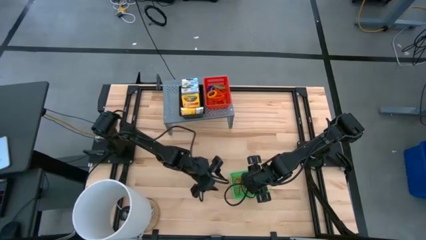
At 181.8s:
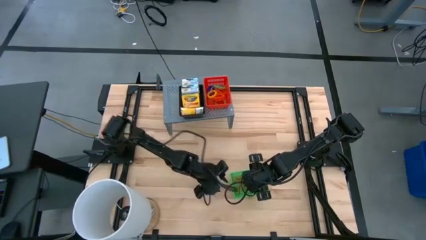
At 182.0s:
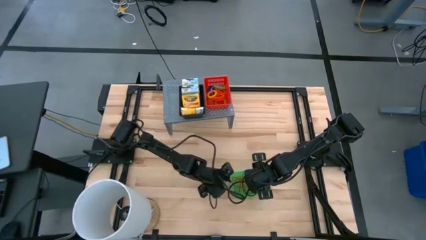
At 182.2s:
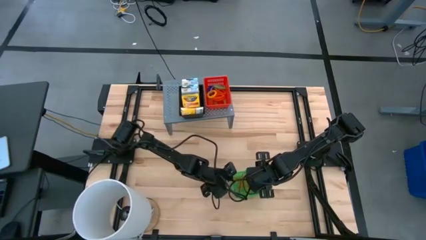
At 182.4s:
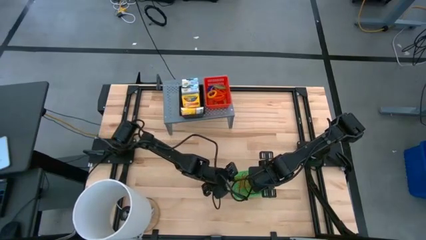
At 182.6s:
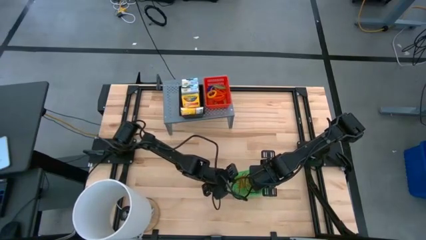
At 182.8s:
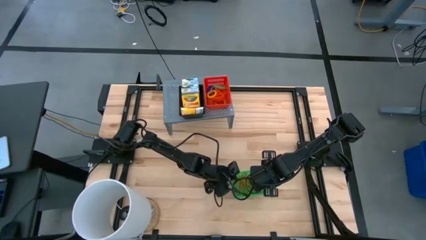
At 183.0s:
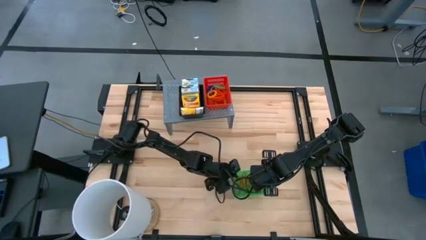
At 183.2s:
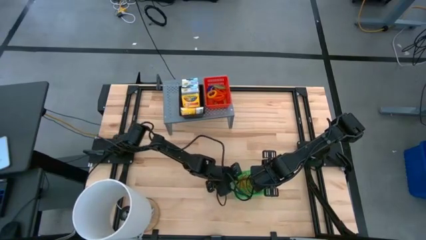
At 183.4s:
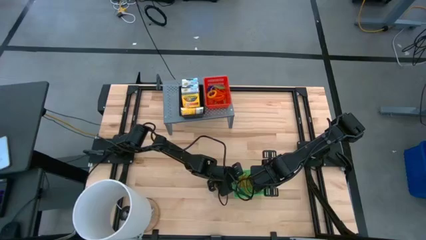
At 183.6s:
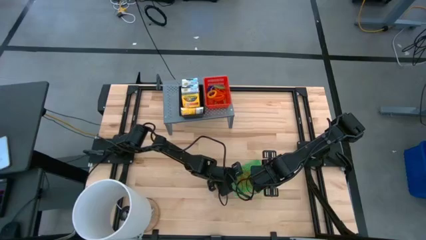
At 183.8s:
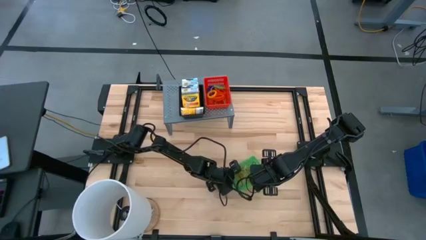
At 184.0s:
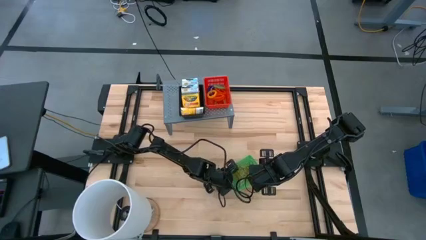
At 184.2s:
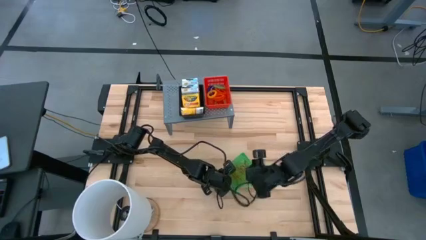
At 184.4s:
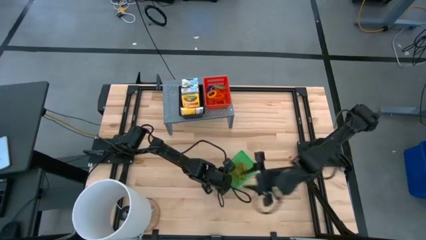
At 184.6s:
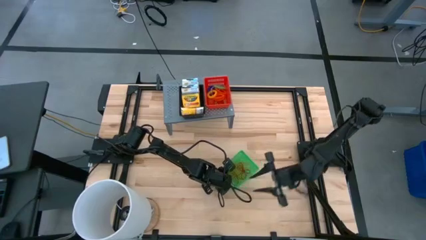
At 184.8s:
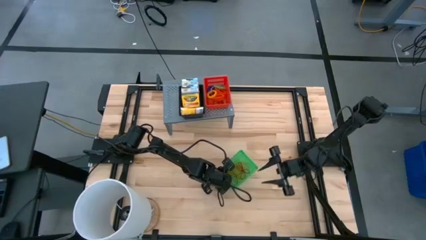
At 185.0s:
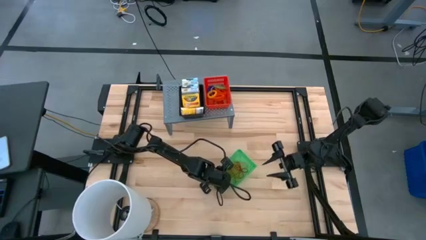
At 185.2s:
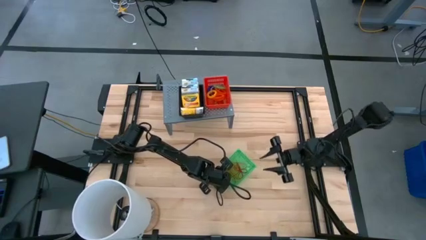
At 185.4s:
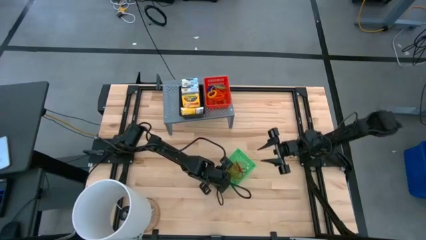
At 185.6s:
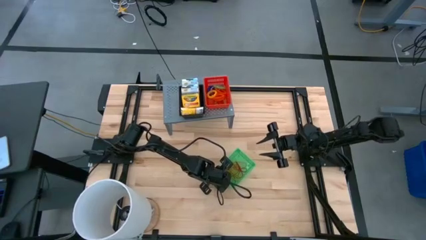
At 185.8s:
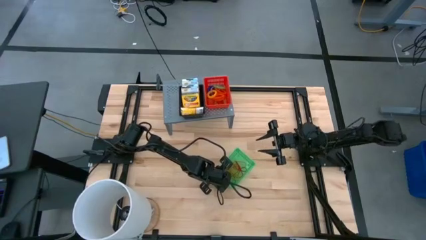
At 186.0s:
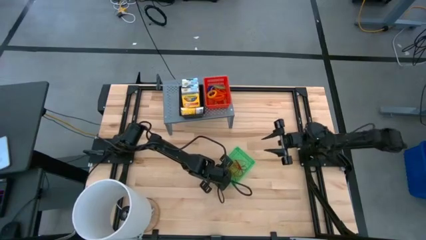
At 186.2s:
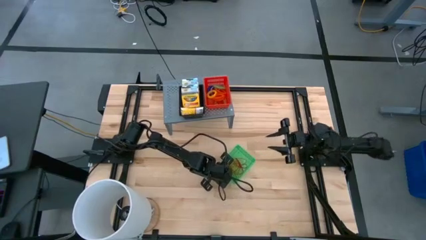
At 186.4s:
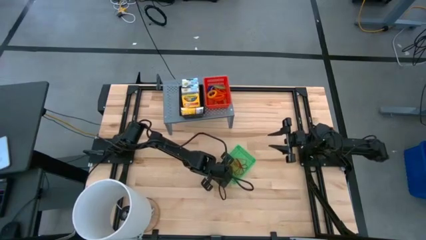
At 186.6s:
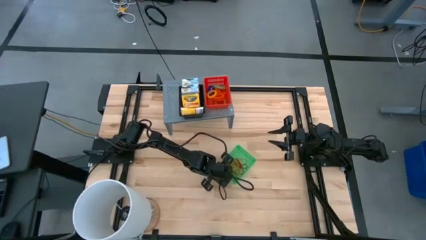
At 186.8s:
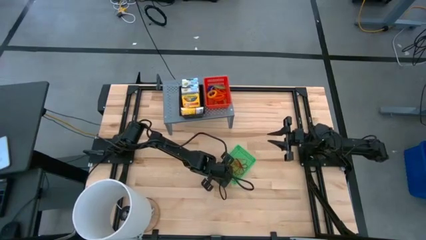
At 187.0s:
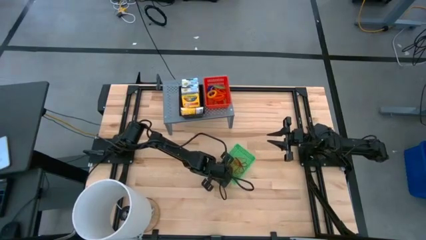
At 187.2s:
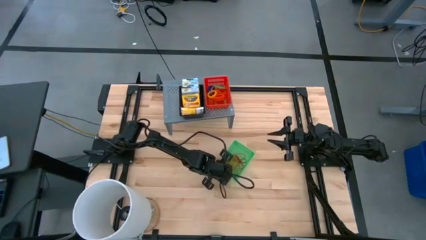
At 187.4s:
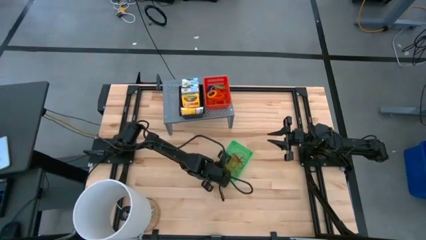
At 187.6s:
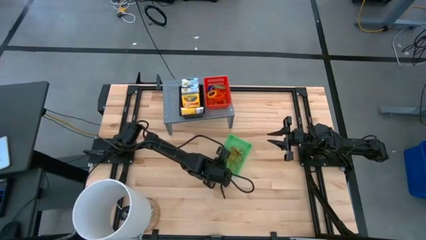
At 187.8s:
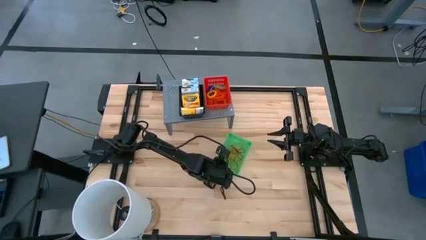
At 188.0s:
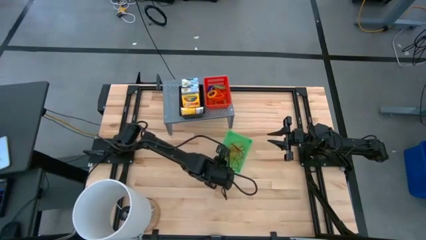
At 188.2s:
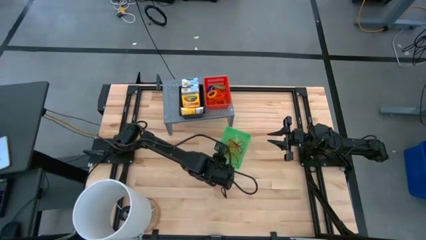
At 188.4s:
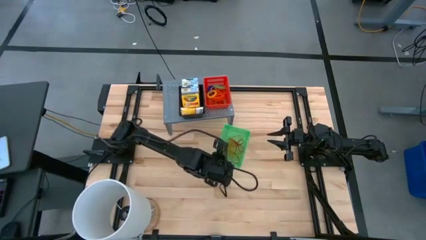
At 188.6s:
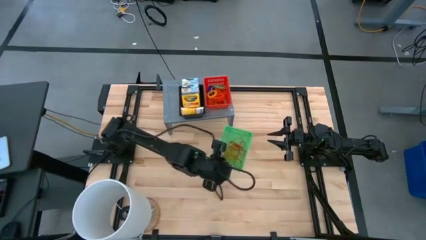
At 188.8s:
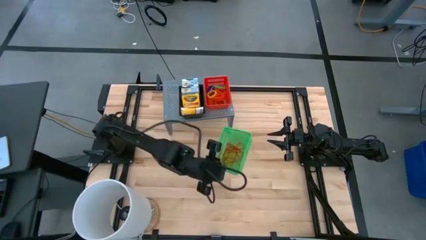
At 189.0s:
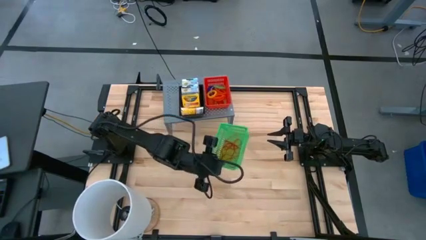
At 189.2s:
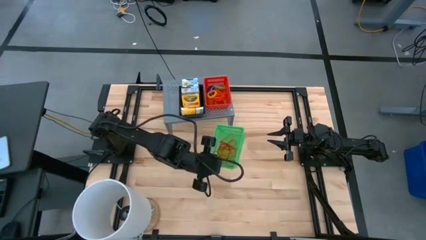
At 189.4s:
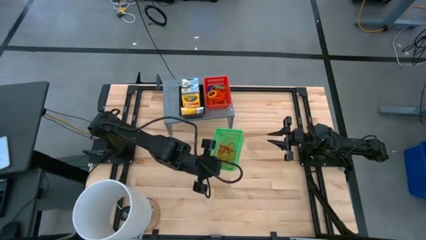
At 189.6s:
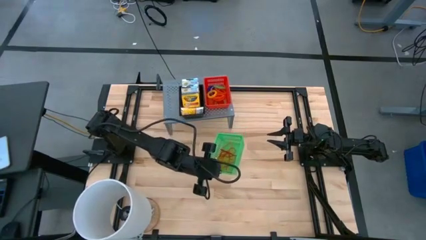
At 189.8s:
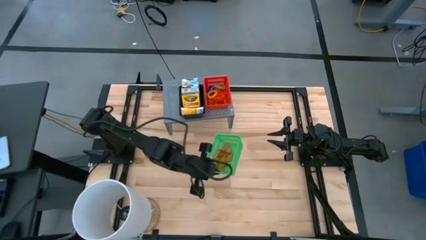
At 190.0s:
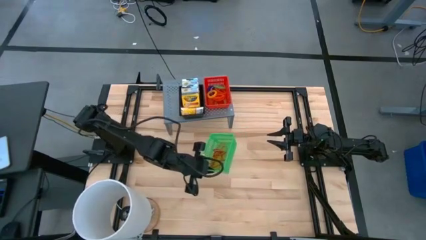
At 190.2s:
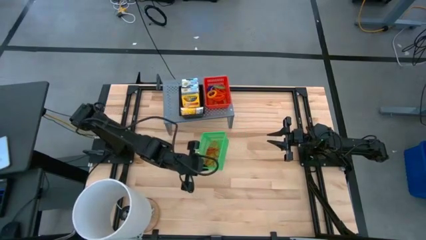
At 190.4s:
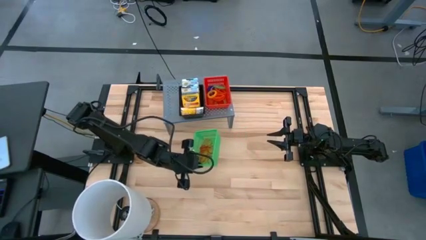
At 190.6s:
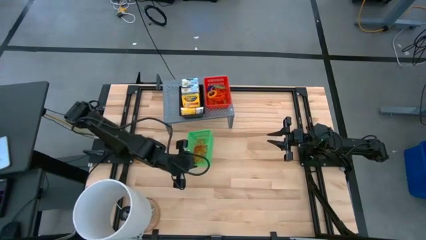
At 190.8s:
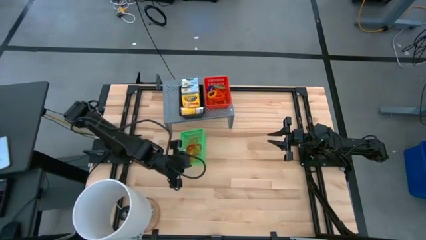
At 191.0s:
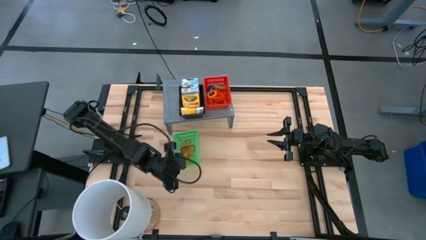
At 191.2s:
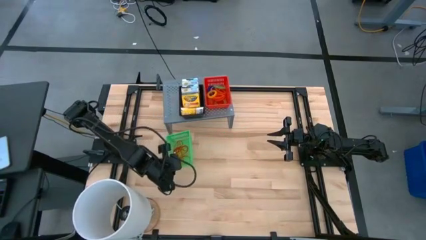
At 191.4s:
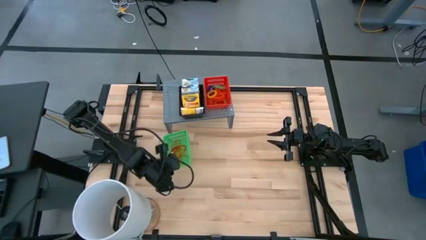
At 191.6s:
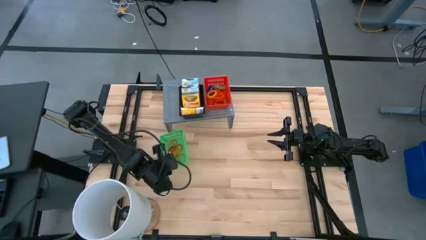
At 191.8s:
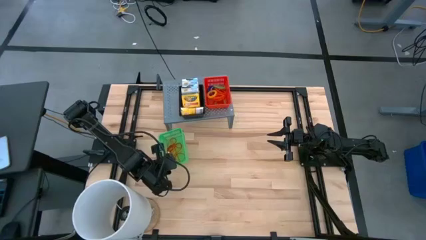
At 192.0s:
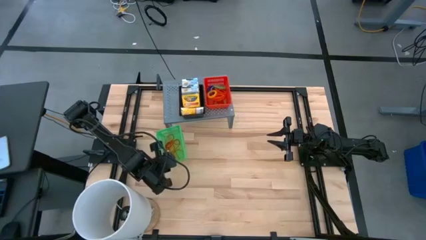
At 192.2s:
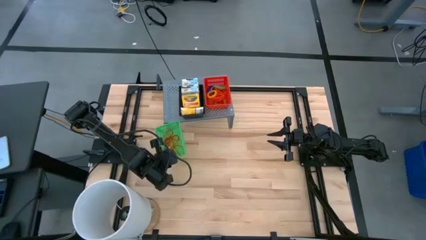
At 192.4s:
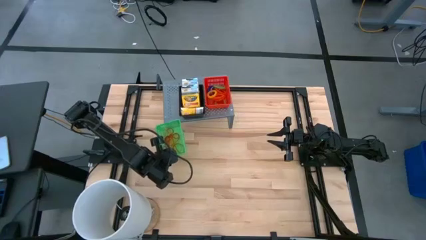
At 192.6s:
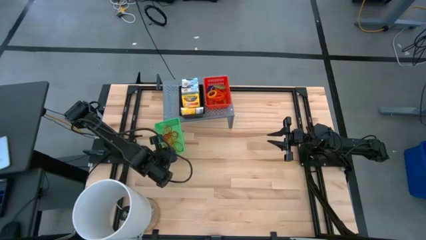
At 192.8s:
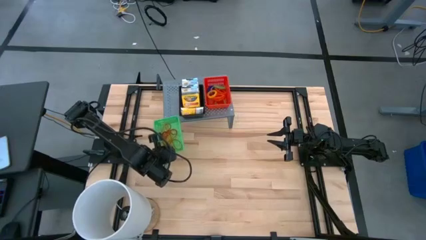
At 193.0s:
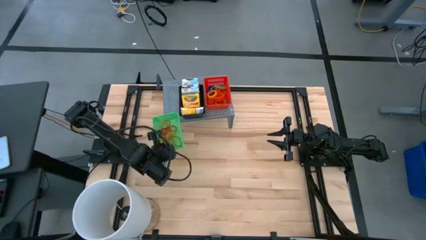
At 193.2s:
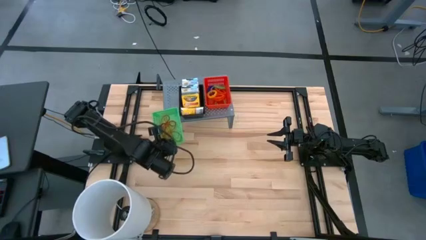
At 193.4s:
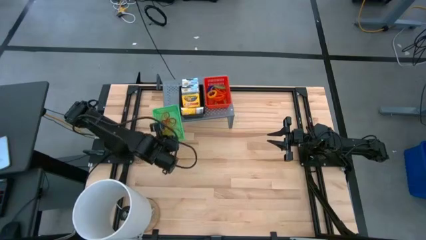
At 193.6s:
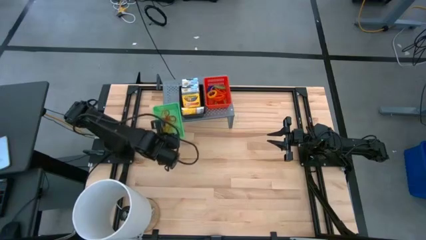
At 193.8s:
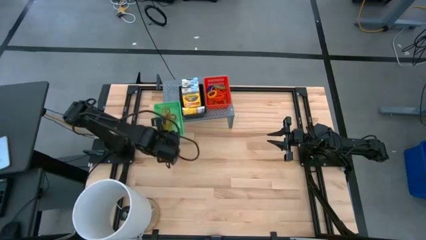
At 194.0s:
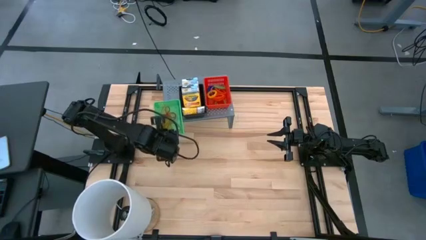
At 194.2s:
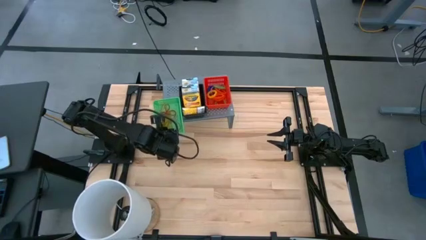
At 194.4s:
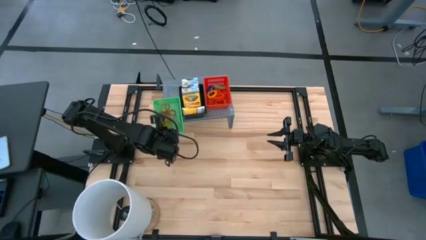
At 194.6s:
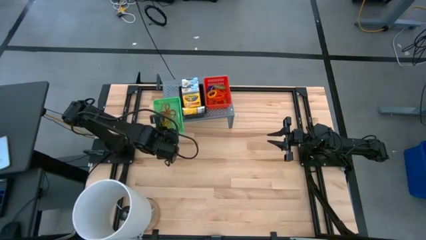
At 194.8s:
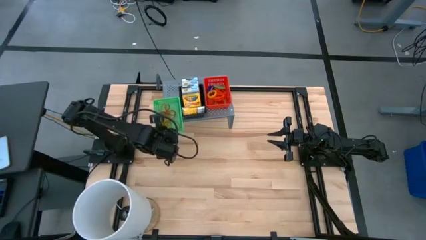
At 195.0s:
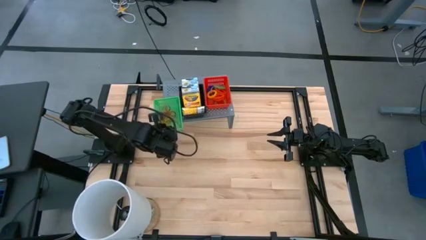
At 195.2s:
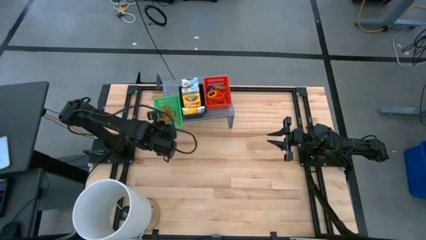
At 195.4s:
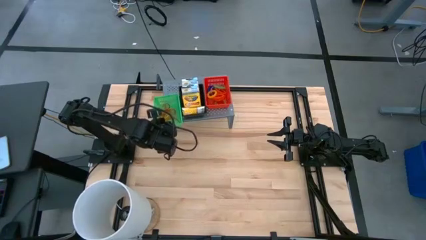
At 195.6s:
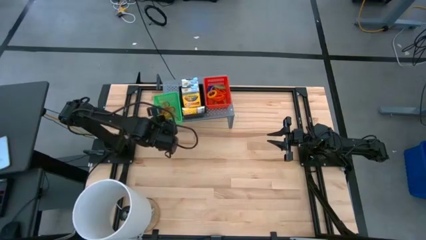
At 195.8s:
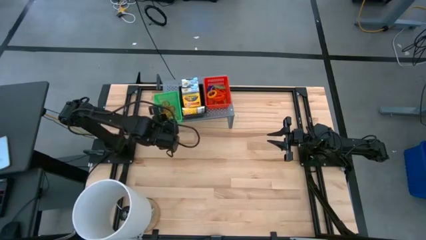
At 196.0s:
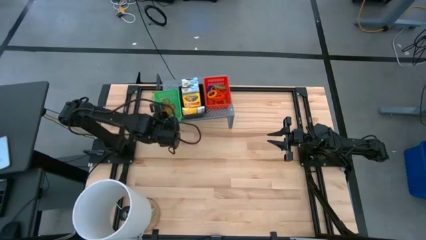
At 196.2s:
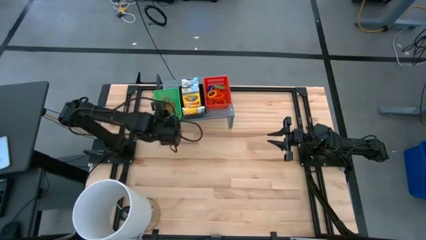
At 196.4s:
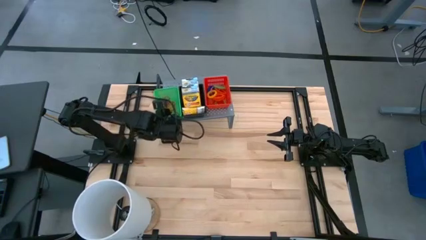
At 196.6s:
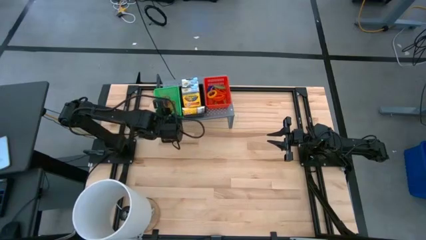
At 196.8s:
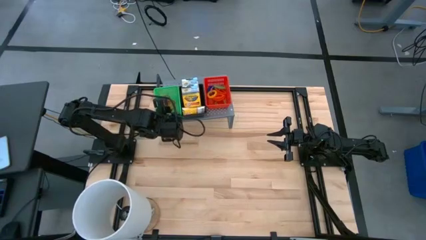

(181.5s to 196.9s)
Task: Pick & Place Office Desk Supplies
Put the green bin on the shelf

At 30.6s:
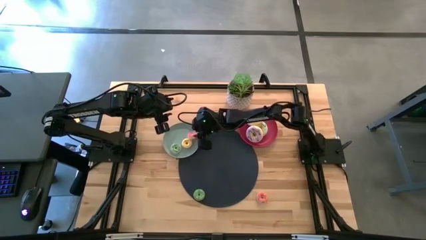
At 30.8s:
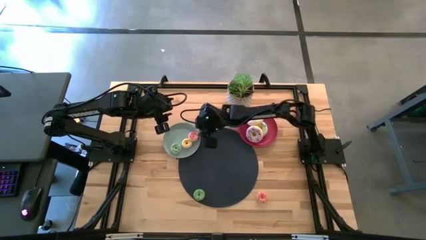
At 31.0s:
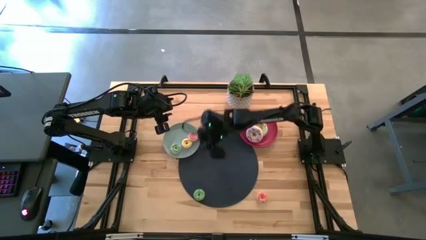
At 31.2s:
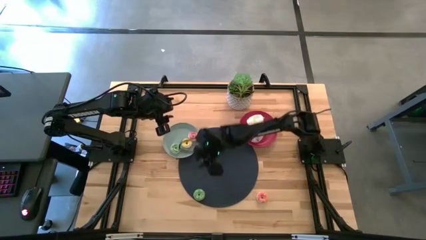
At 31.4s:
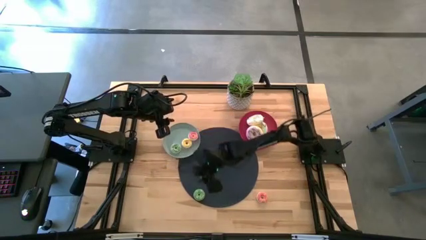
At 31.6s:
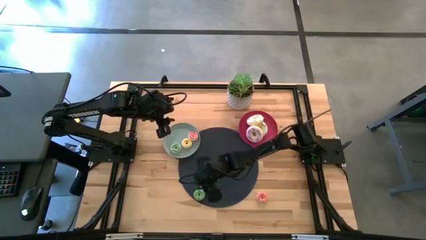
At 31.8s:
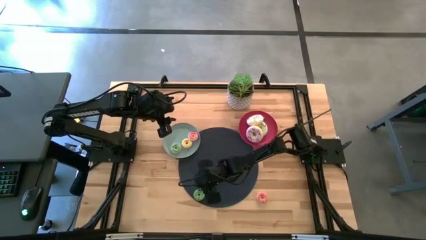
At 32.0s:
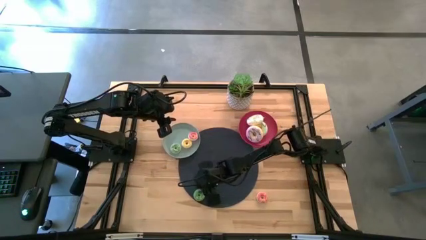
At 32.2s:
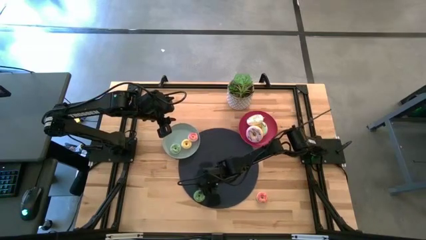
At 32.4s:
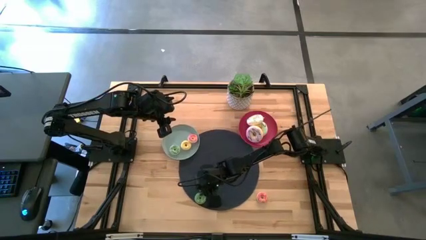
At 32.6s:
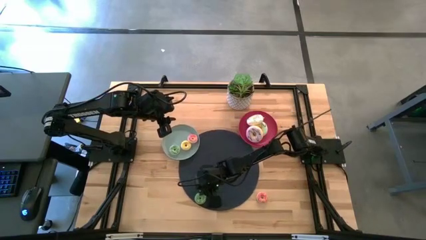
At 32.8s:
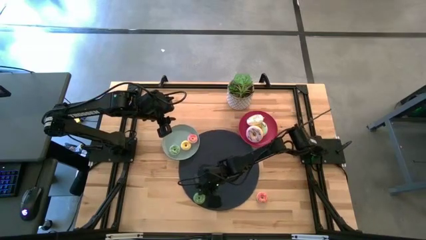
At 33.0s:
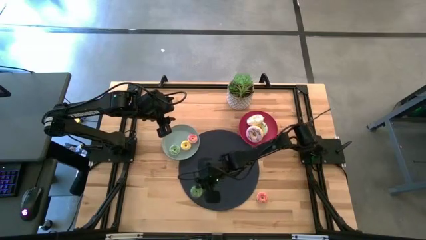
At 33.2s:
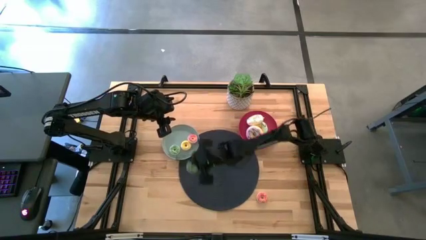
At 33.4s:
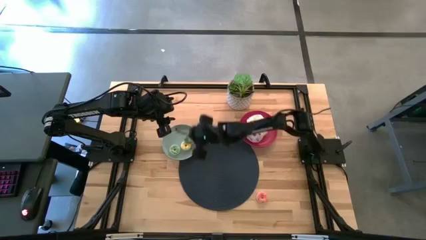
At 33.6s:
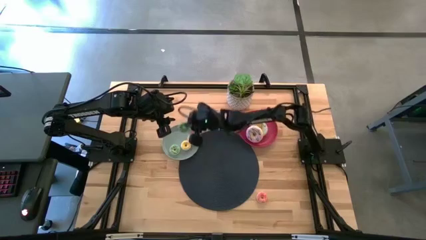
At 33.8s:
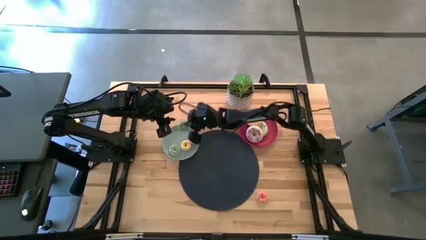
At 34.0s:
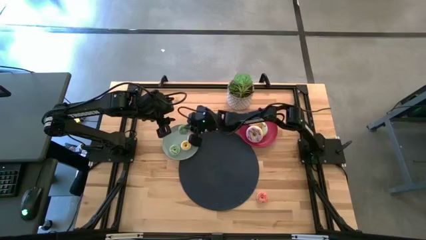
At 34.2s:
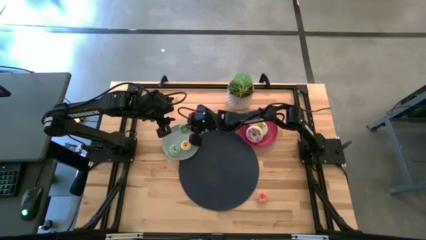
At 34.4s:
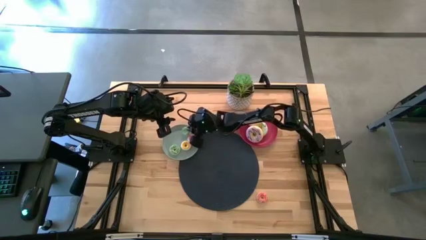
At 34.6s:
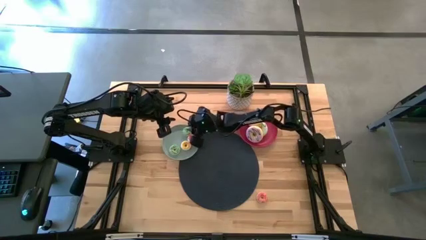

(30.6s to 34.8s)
Task: Pick & Place donuts
Put the small green doughnut on the blue plate
